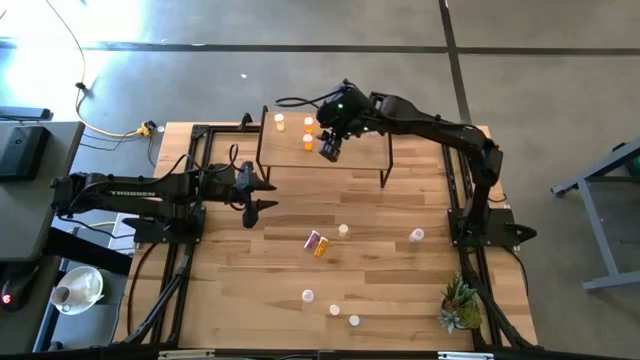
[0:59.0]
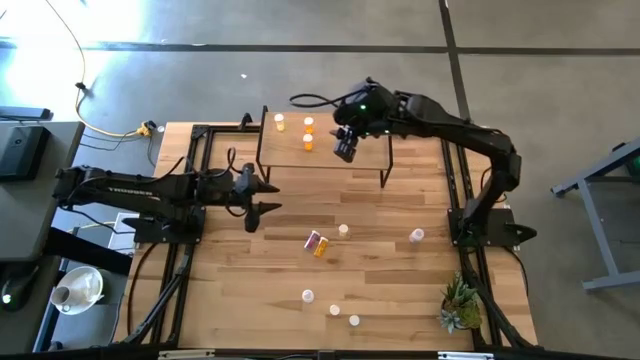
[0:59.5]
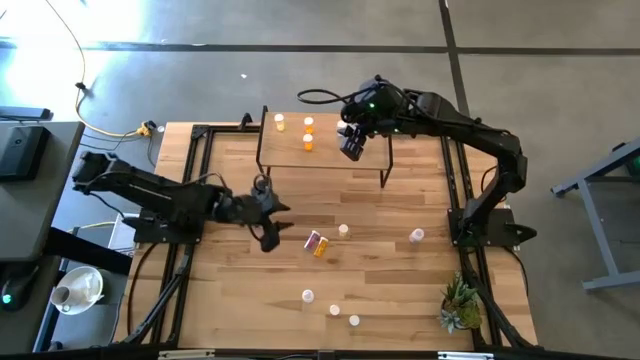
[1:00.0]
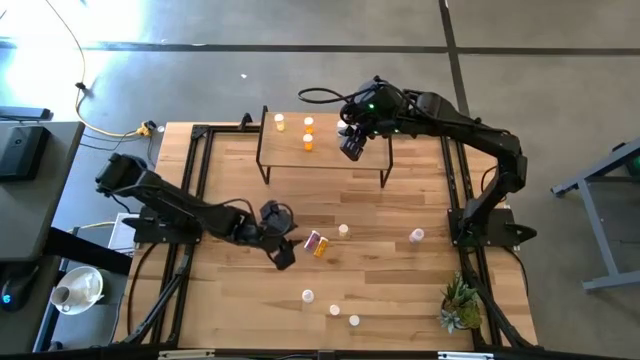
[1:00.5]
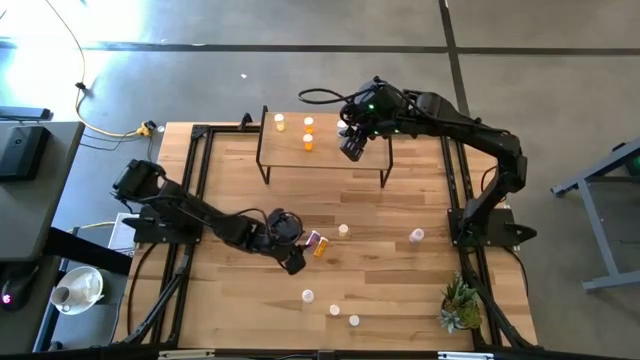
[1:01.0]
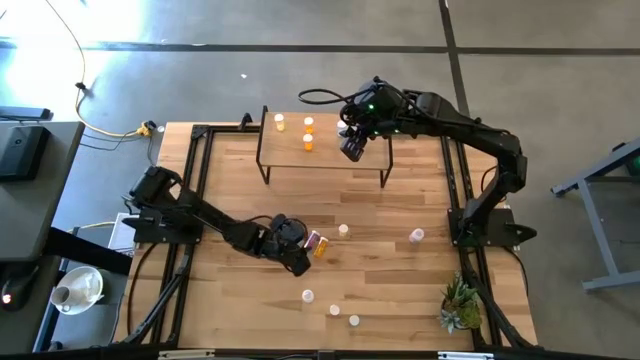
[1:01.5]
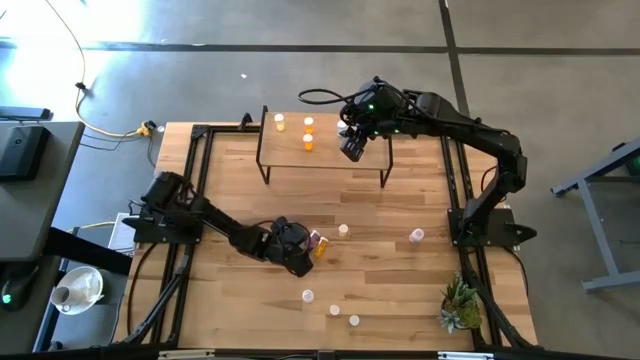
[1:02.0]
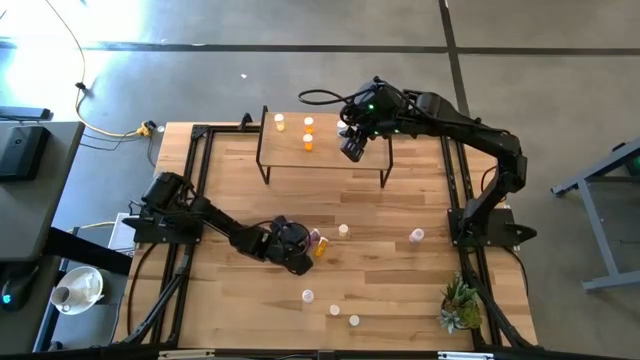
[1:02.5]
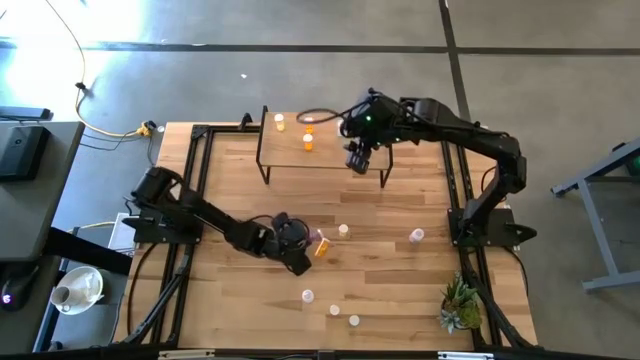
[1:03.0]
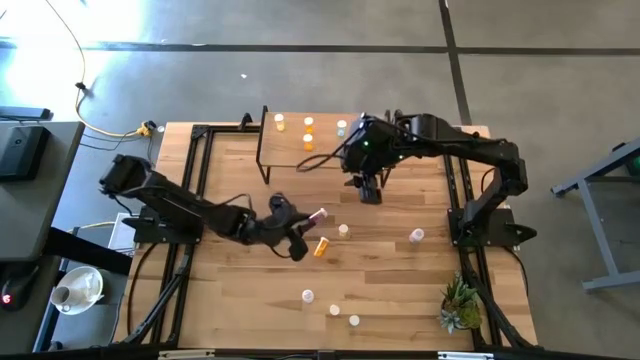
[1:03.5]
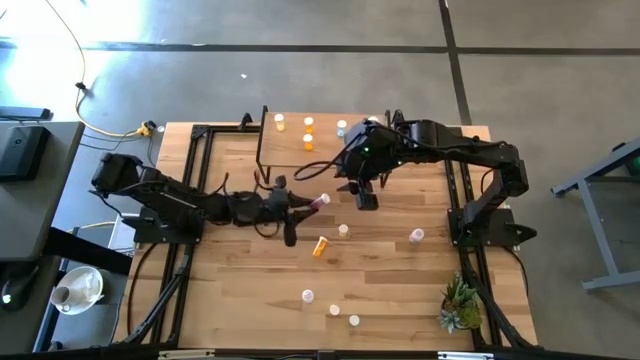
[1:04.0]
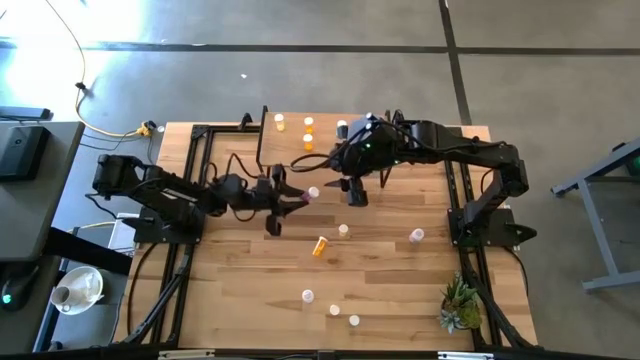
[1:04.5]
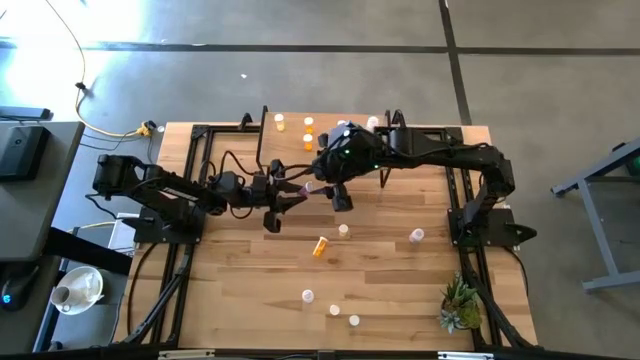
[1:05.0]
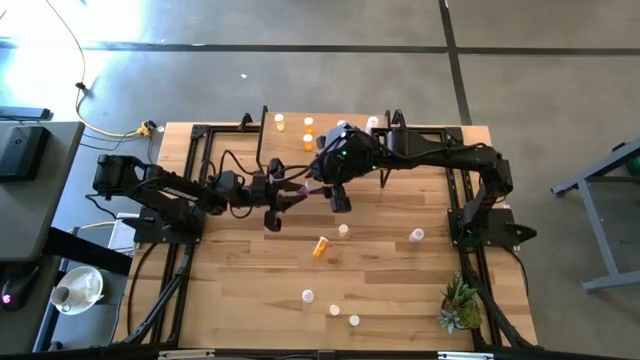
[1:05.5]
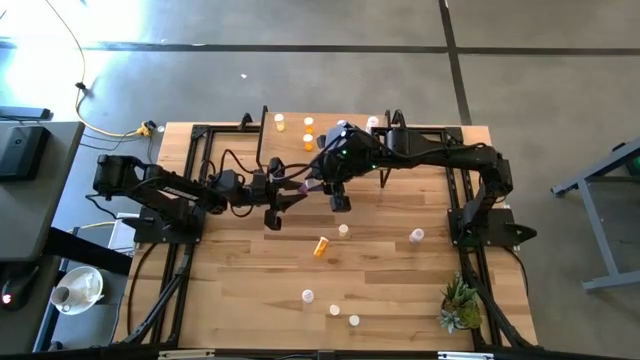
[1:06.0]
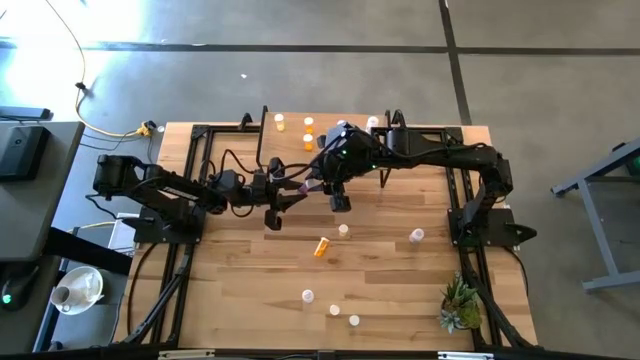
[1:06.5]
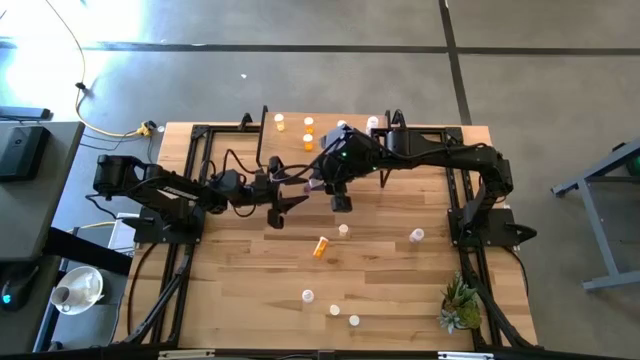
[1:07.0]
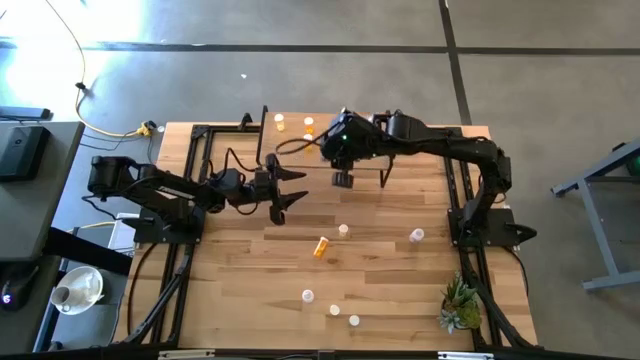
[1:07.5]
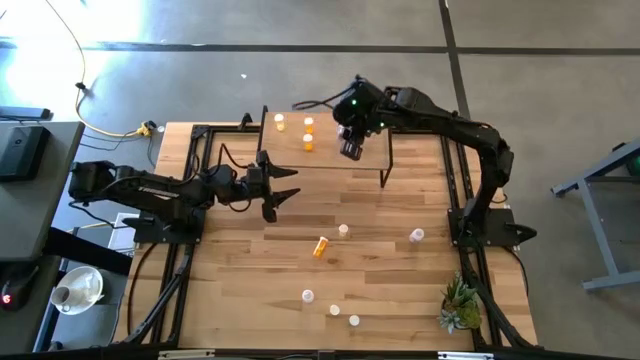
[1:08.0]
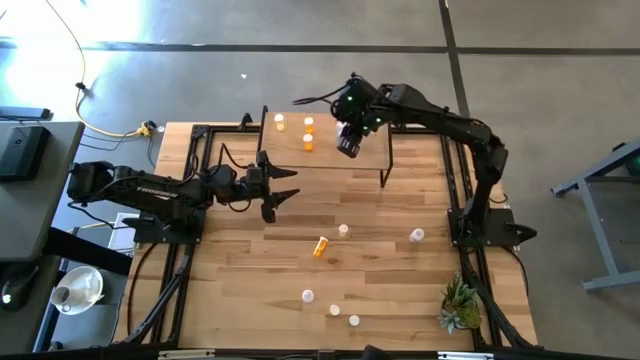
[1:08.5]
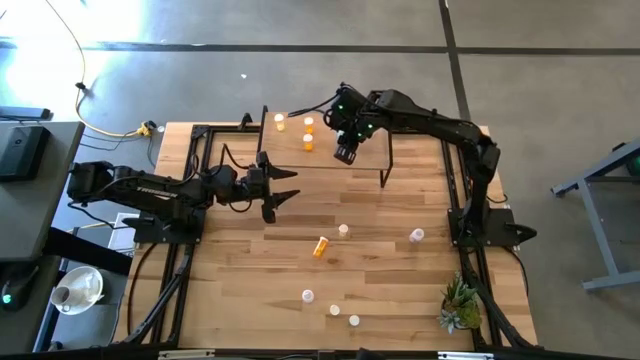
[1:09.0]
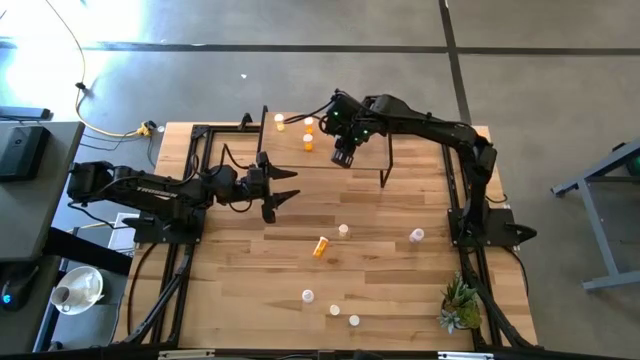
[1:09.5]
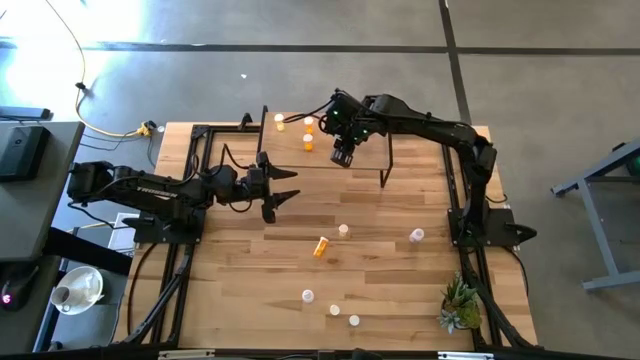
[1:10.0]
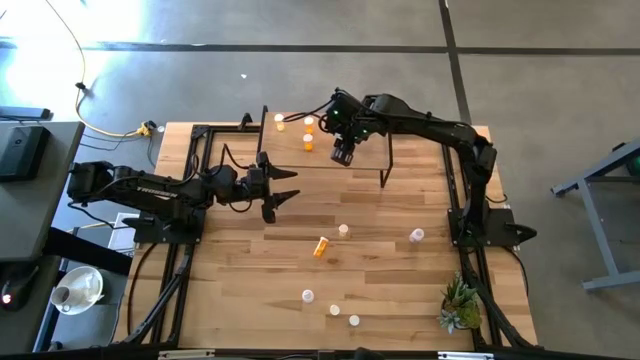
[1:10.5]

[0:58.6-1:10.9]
Task: Pick and place medicine bottles onto shelf by color
Put the top blue pill bottle on the shelf aligned with the blue pill bottle

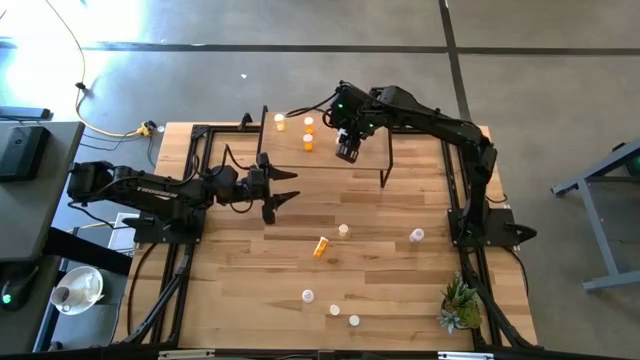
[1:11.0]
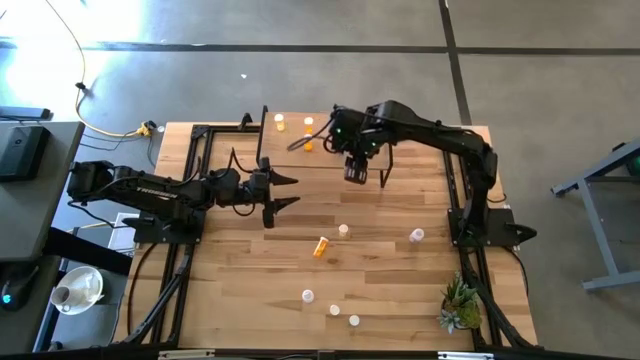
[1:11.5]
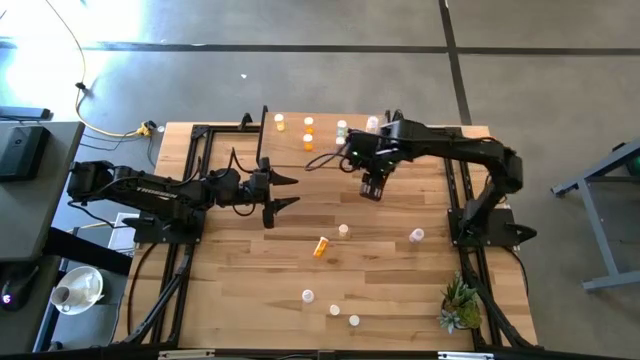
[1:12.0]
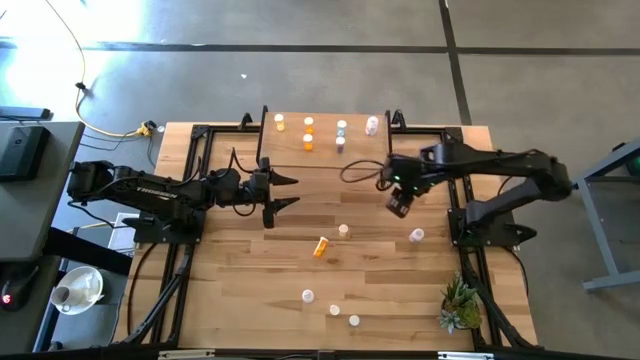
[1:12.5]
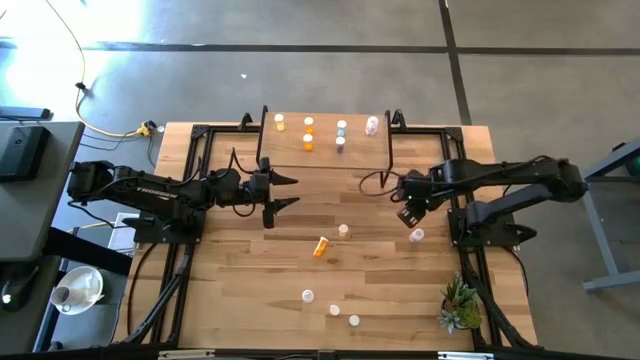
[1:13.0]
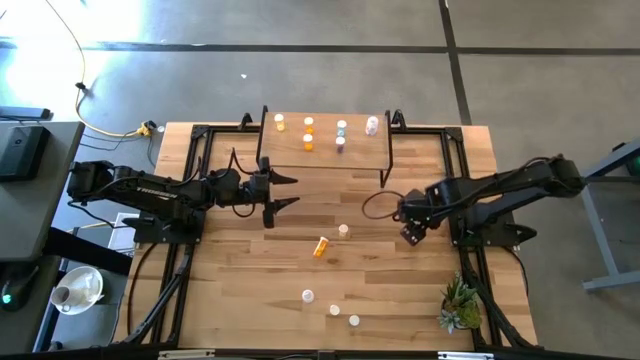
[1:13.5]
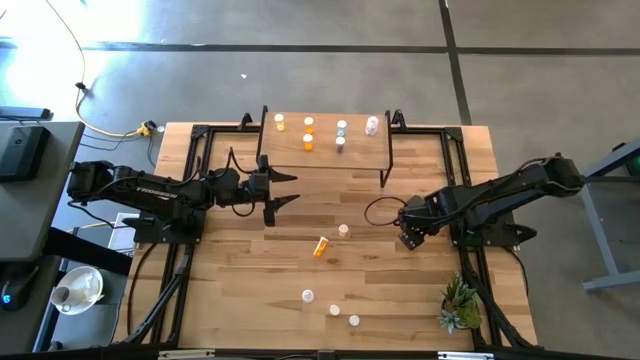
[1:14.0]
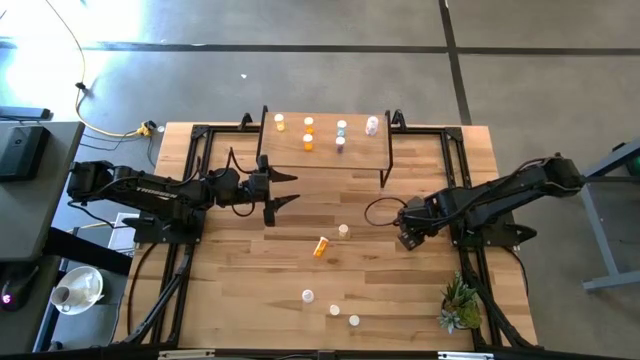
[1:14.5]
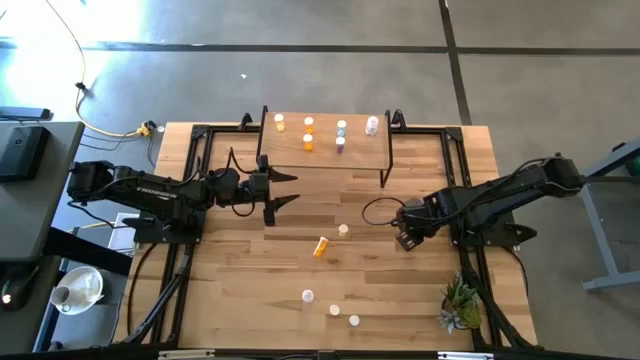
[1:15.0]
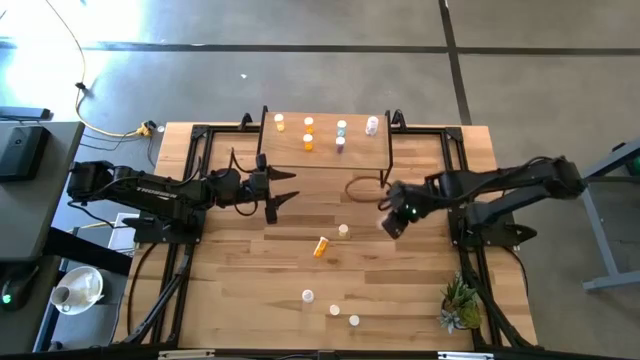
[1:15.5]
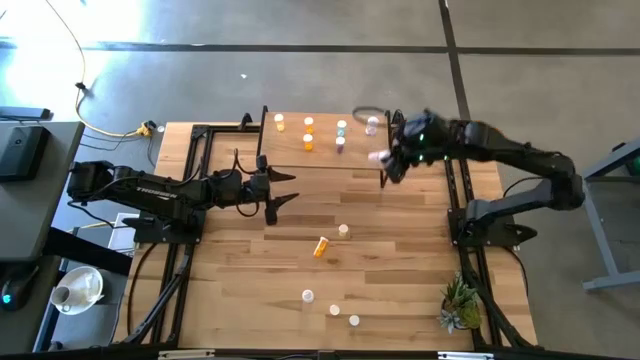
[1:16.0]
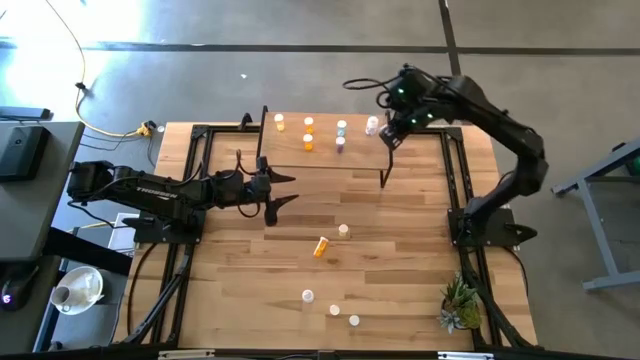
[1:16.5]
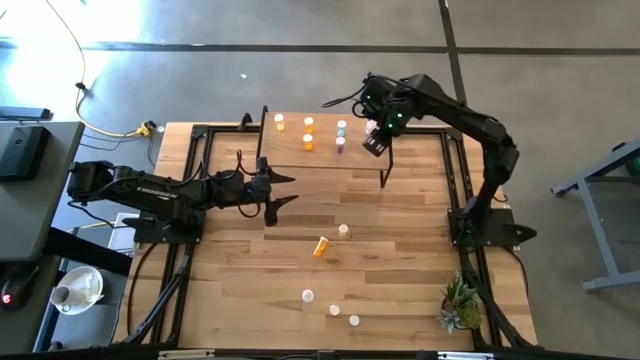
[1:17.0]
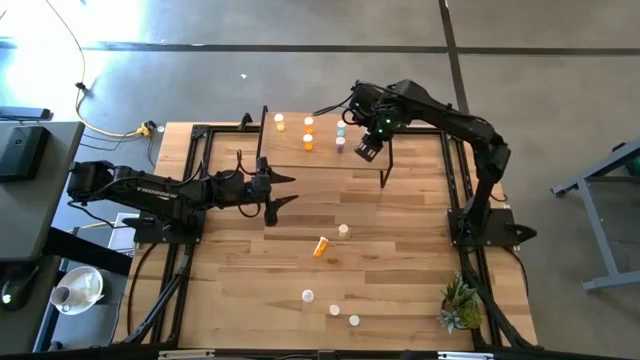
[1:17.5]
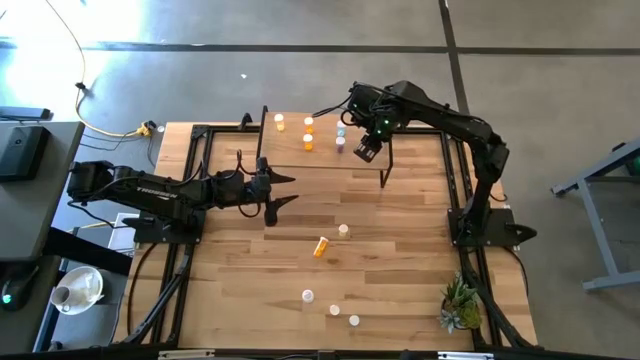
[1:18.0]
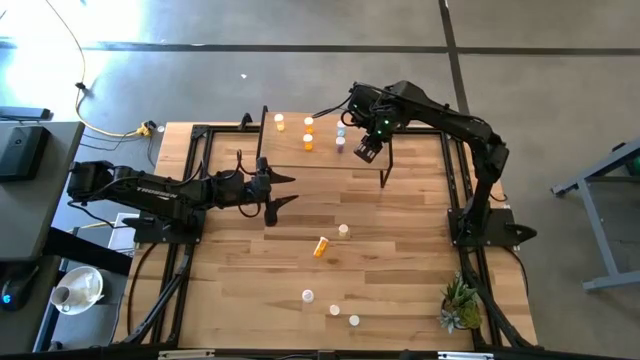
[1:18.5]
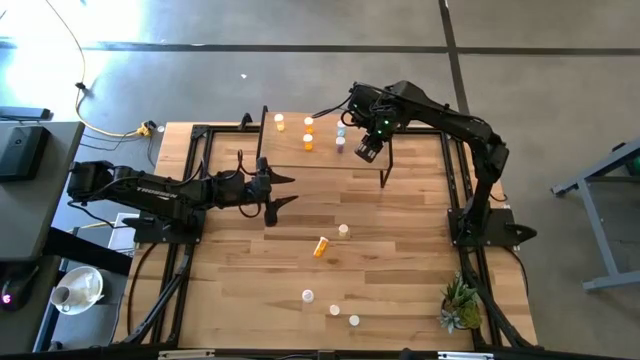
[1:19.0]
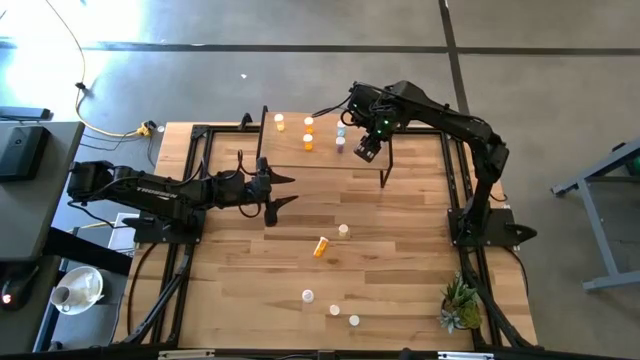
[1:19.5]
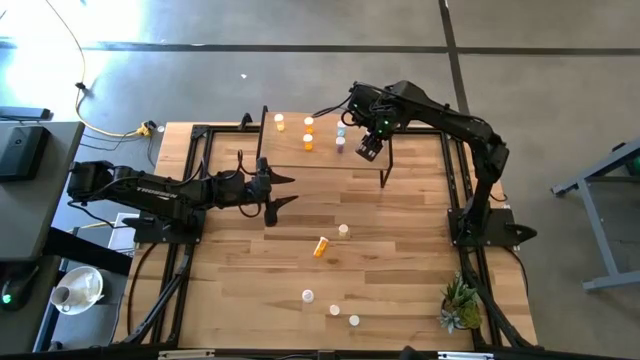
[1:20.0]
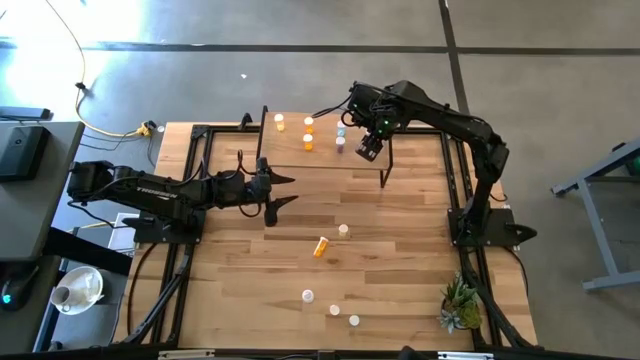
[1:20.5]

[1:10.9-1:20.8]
Put the top transparent pill bottle on the shelf aligned with the transparent pill bottle
